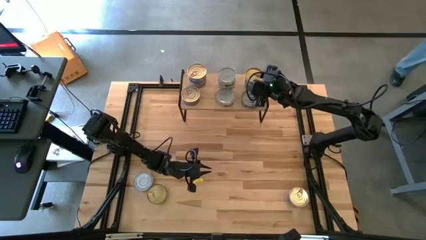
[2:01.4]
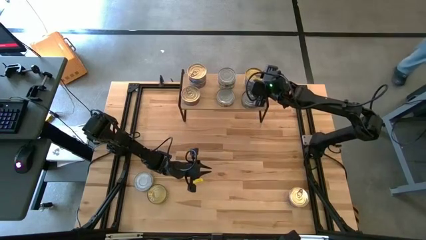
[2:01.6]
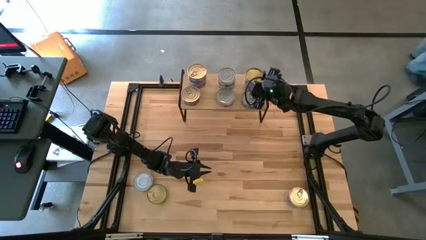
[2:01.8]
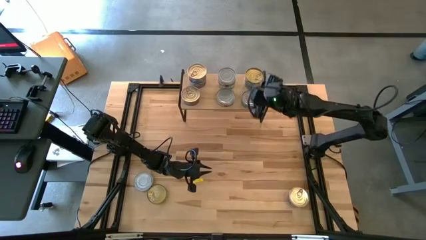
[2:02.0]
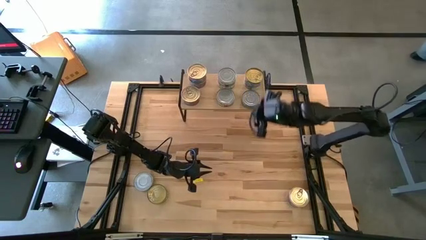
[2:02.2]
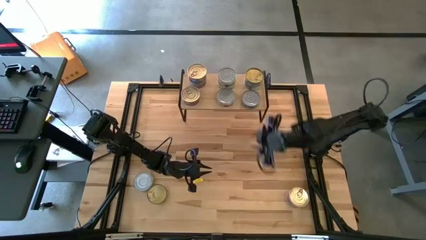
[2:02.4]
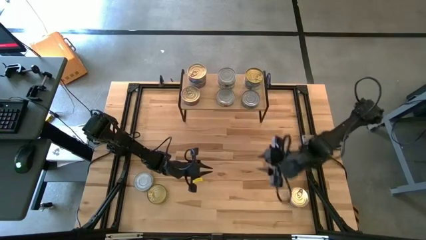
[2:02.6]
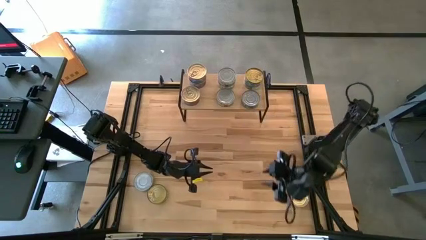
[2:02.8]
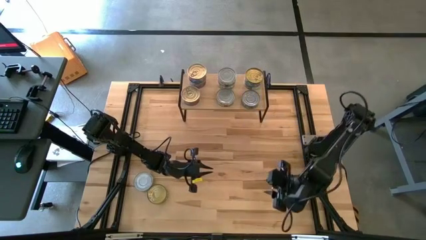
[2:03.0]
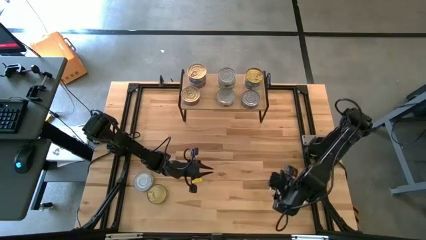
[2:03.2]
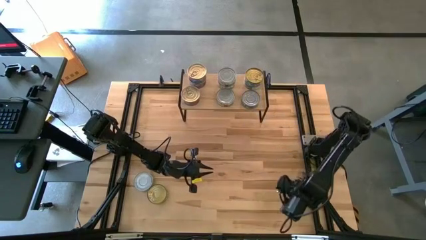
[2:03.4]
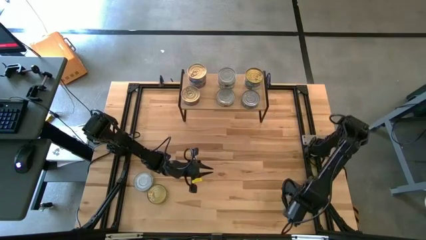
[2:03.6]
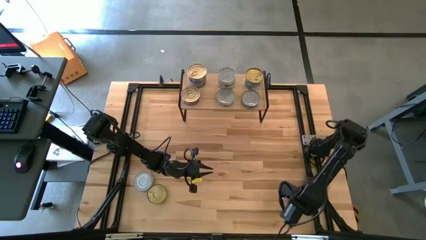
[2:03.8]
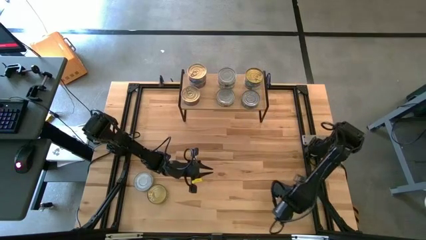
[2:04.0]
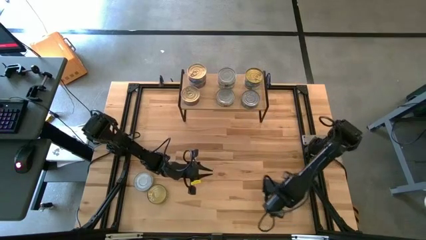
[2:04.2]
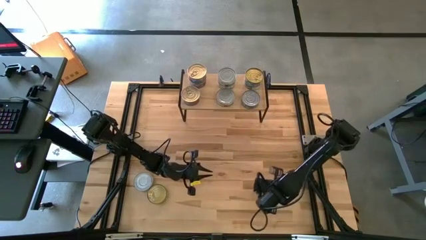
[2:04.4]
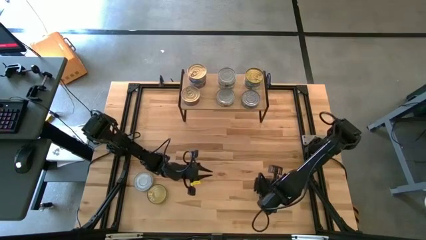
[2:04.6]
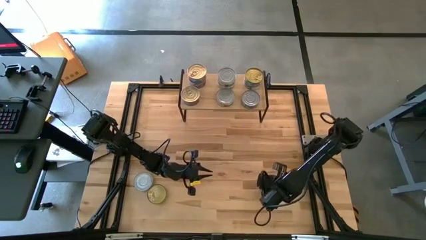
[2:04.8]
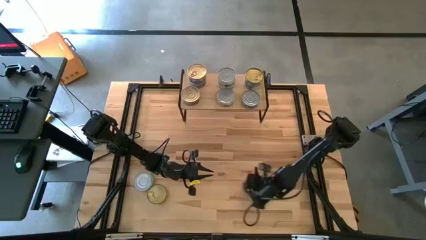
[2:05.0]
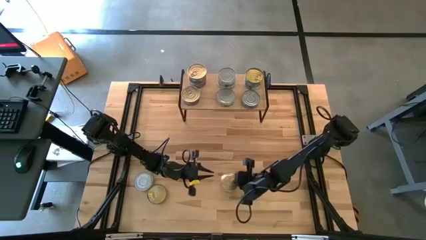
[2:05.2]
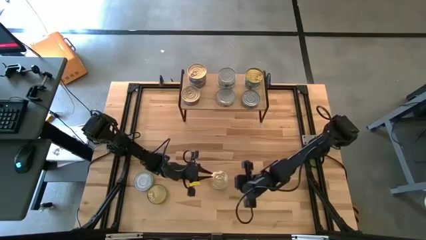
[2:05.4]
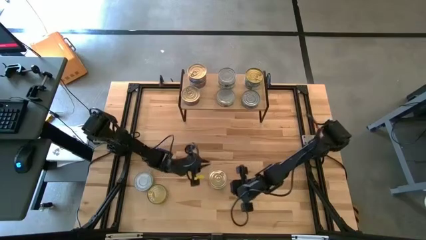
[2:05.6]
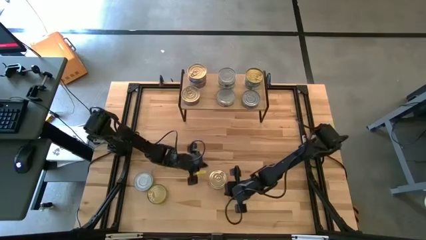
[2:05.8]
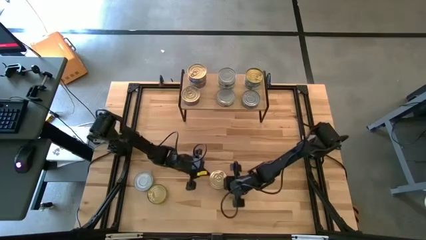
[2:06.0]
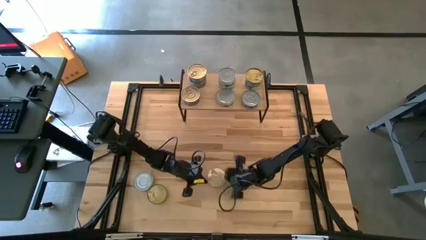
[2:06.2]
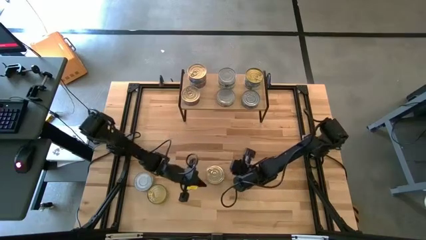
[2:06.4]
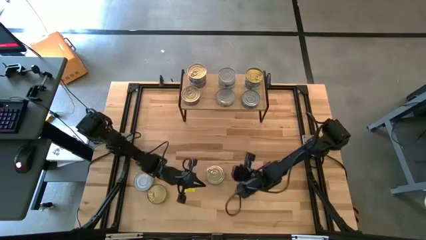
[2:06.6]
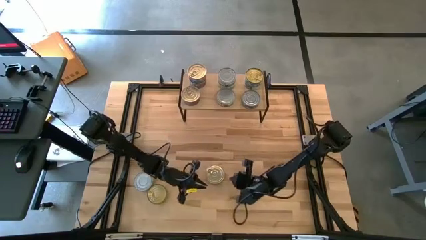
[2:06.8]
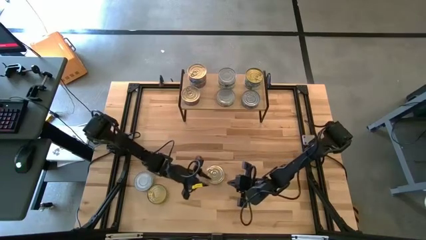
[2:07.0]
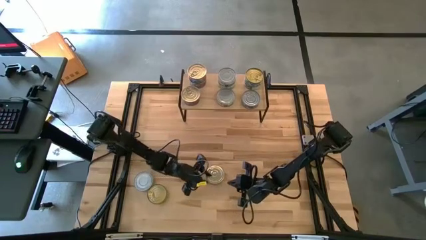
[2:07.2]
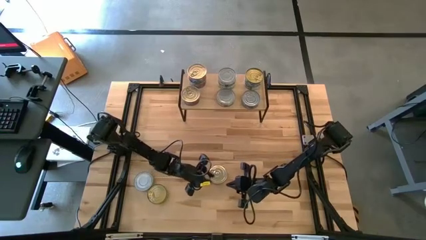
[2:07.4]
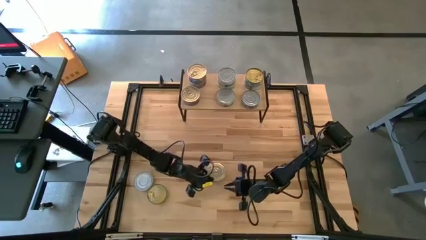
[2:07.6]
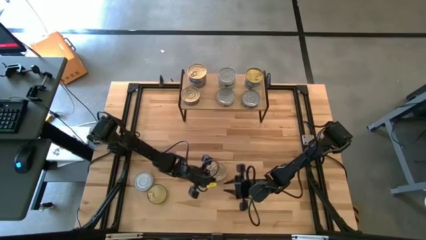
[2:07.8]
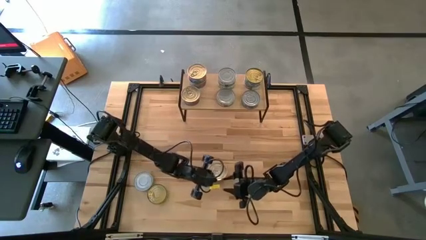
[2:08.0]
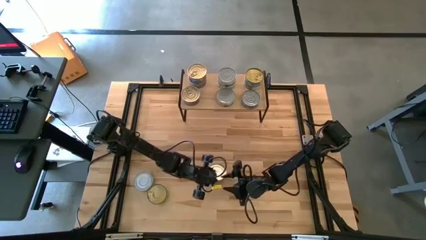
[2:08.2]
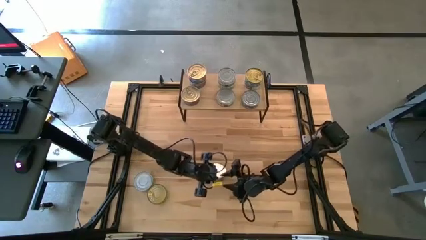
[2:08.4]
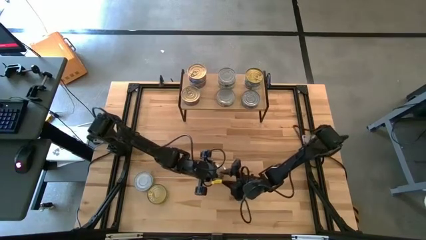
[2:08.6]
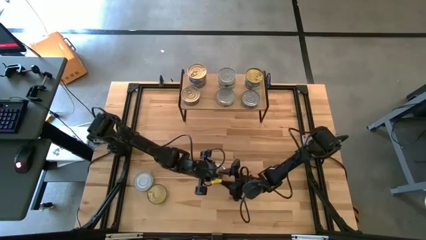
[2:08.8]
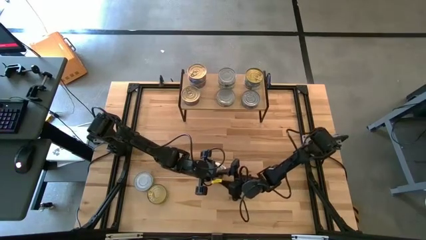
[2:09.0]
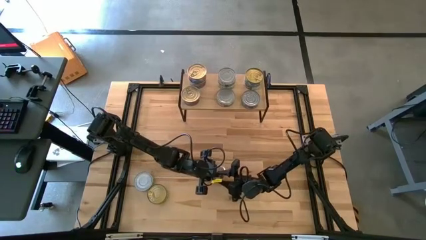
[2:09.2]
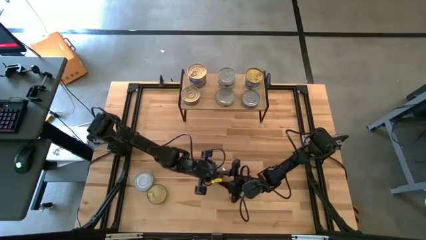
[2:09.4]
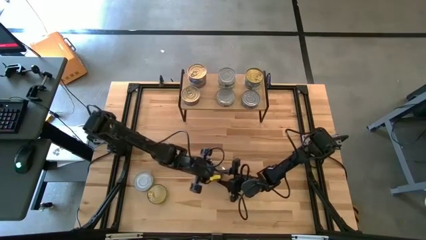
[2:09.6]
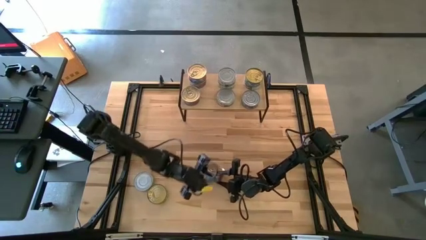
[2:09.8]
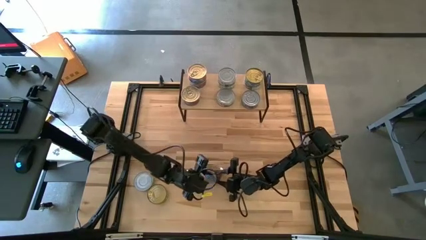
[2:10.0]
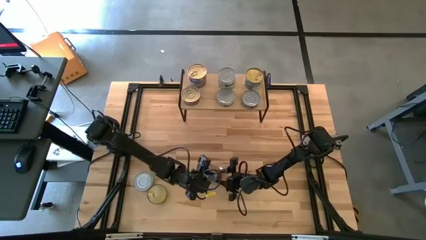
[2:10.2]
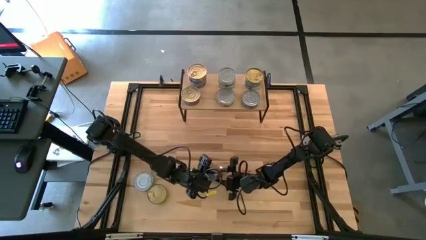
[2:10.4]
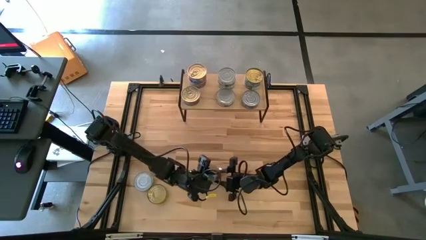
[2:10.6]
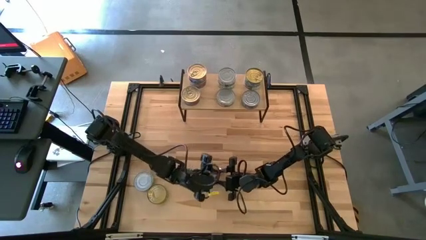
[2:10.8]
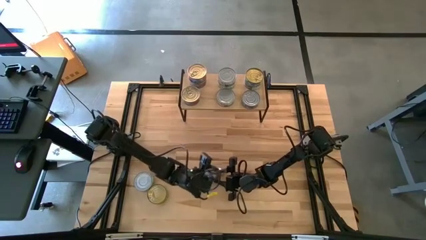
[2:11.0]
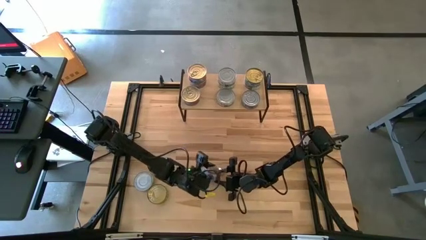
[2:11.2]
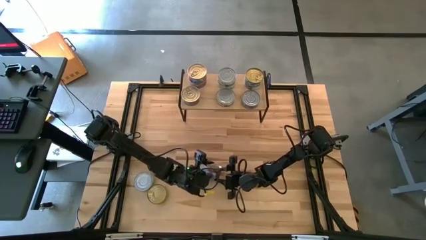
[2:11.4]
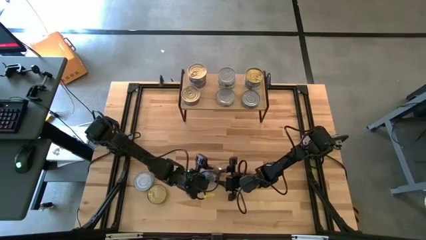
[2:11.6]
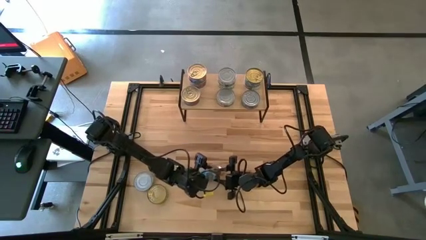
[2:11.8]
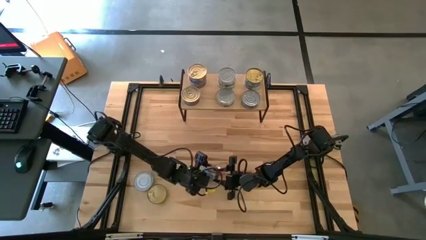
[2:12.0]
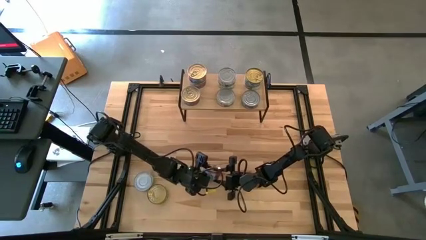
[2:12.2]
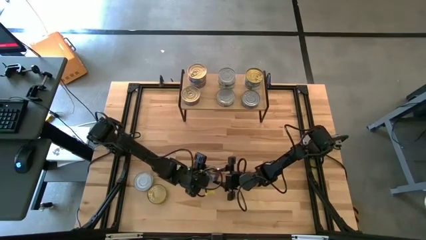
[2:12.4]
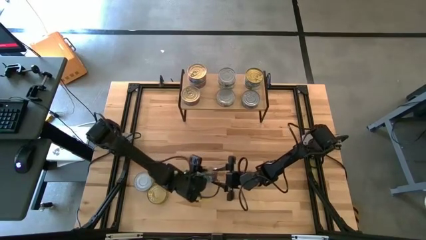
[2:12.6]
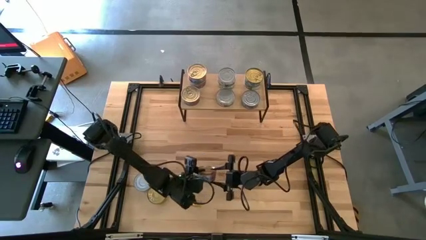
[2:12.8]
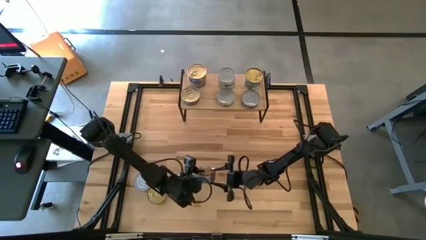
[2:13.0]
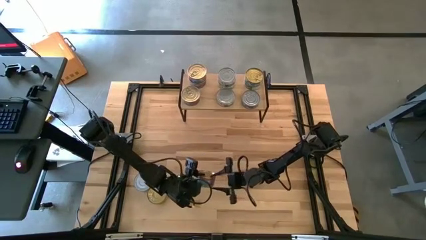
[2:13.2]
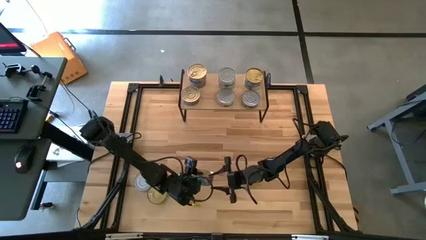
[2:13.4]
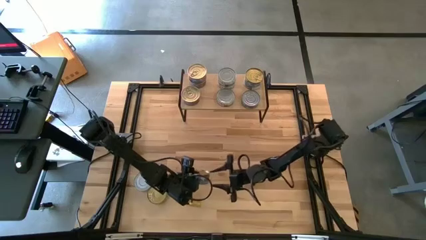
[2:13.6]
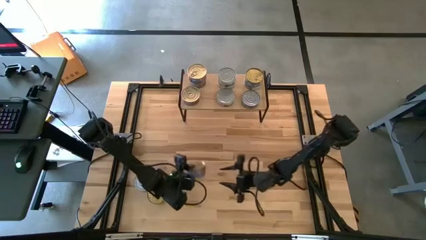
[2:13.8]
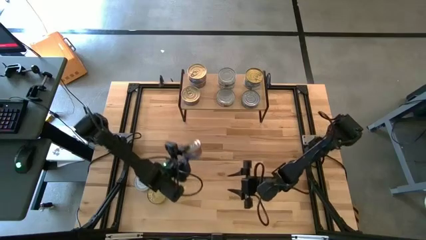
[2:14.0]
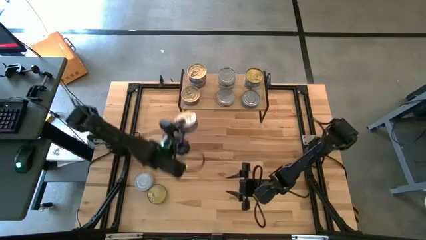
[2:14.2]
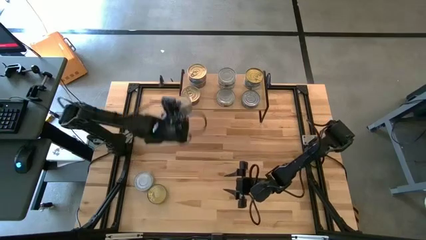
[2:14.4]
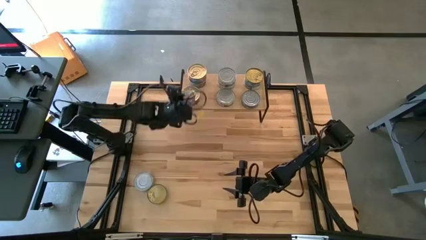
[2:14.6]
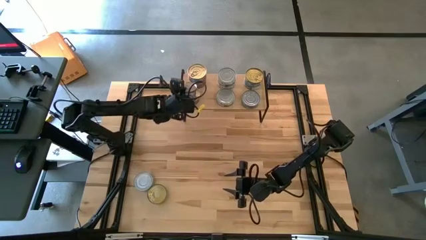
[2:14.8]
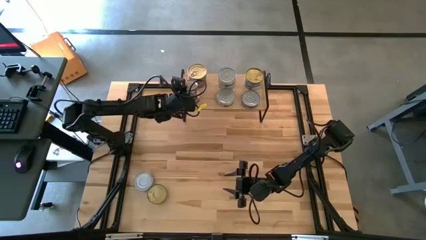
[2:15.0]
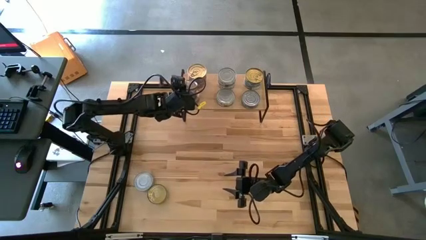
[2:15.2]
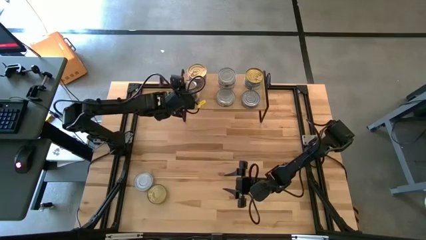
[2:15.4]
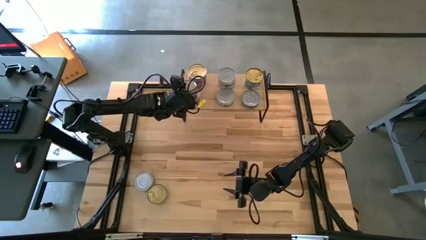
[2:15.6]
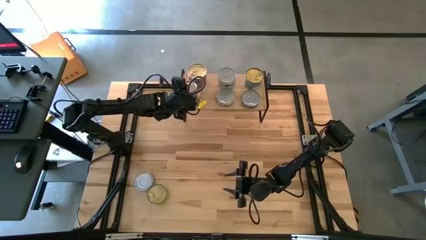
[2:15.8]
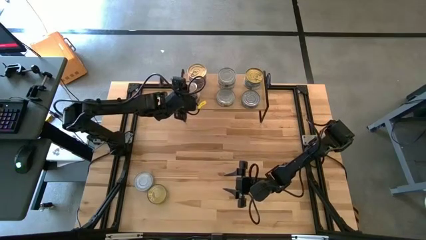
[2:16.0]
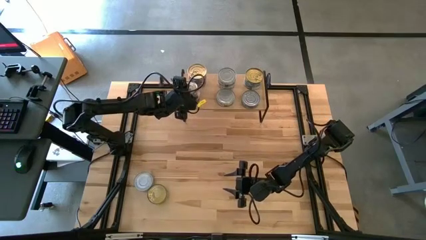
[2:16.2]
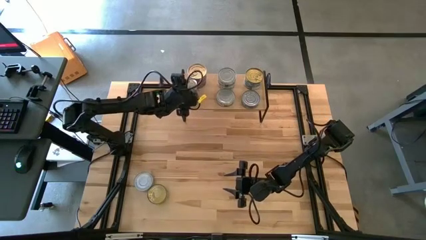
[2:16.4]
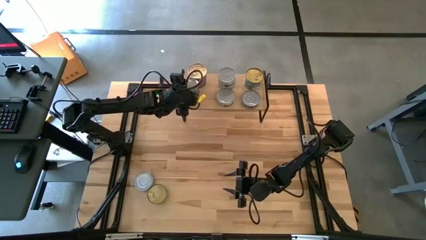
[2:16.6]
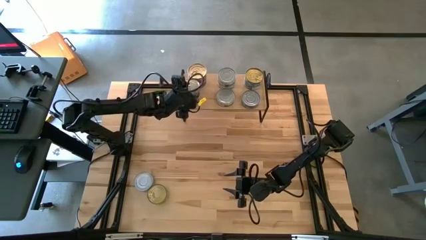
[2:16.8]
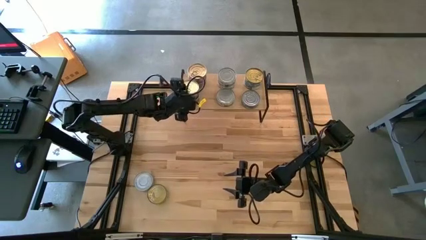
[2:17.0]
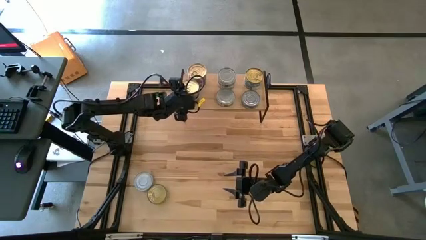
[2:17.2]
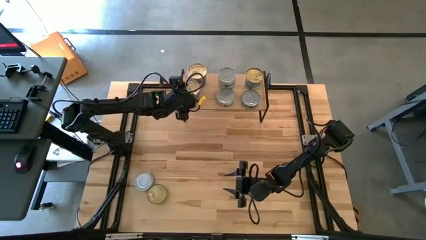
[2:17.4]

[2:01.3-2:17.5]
Task: Stack canned seafood by type on shelf
Stack the blue pink tuna can on top of the other blue pink tuna can on the shelf

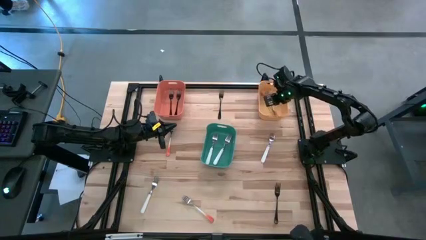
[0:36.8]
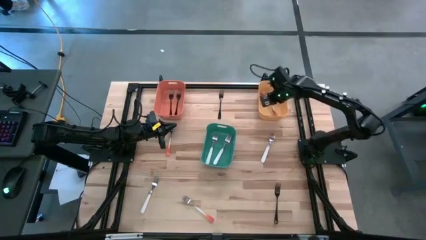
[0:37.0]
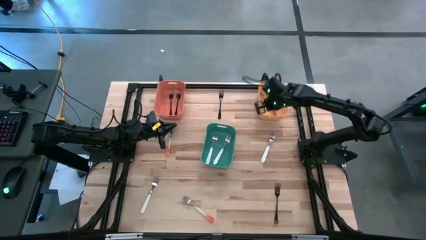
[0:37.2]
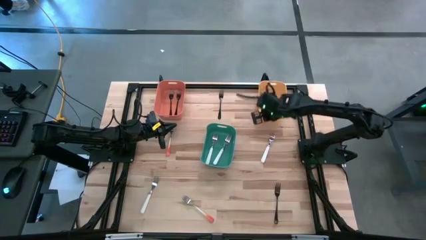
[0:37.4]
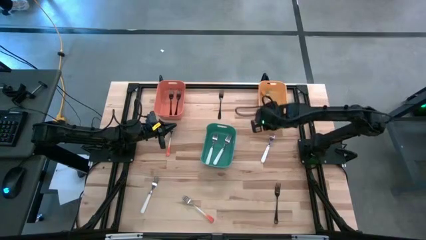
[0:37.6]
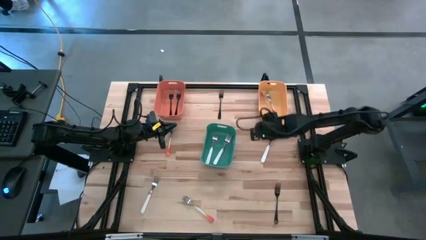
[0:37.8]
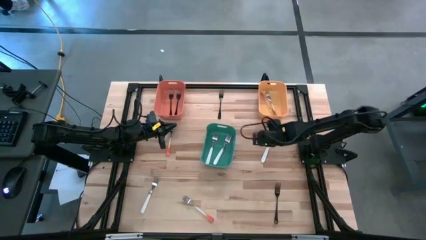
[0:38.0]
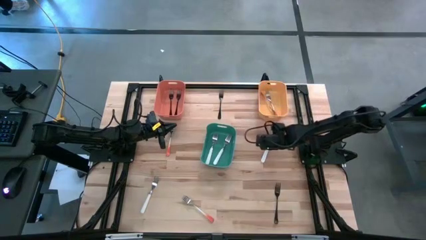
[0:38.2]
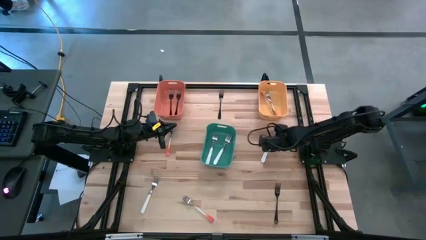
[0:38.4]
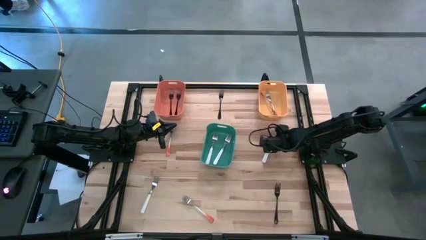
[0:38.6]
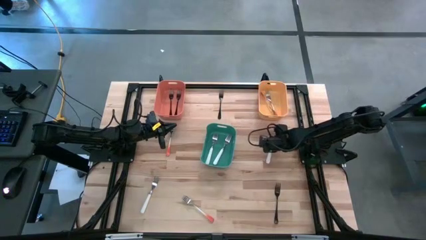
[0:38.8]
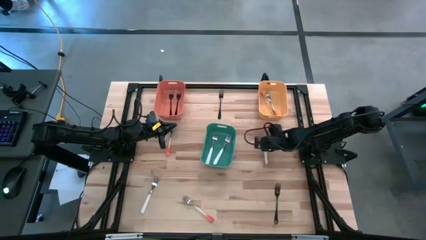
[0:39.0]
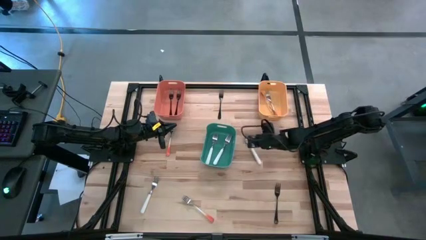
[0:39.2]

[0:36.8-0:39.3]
Task: Sort silverware by color (type)
Put the top white fork into the green bin
